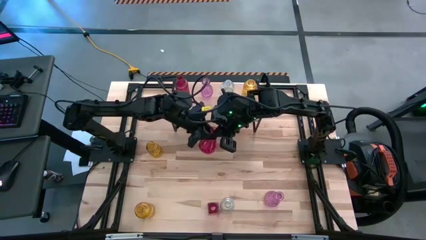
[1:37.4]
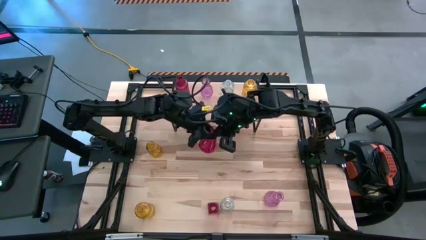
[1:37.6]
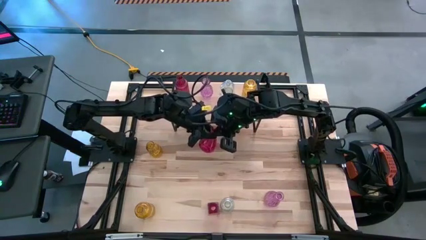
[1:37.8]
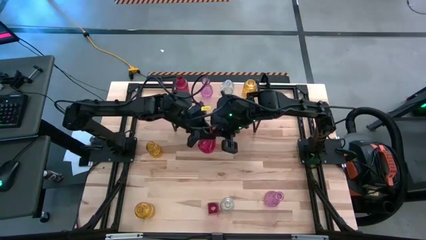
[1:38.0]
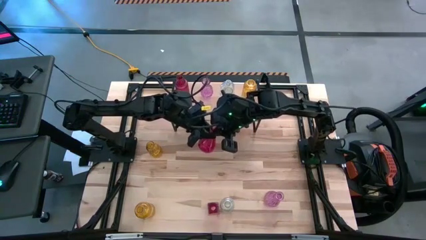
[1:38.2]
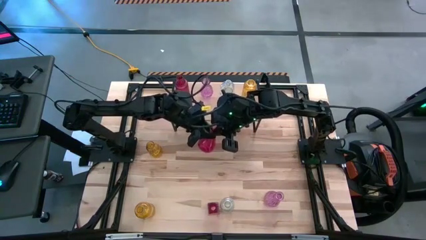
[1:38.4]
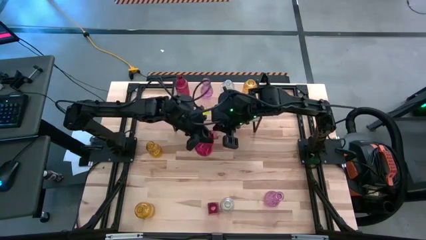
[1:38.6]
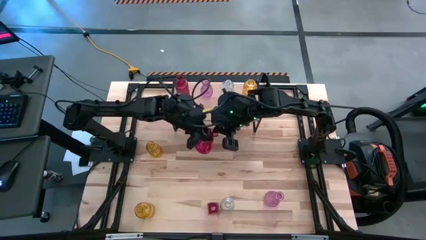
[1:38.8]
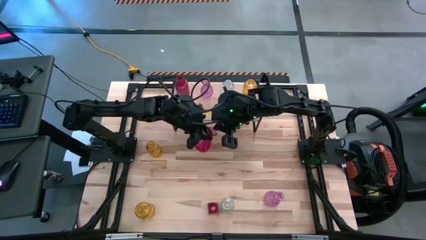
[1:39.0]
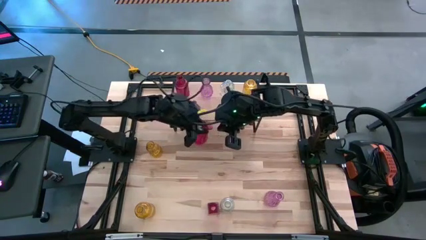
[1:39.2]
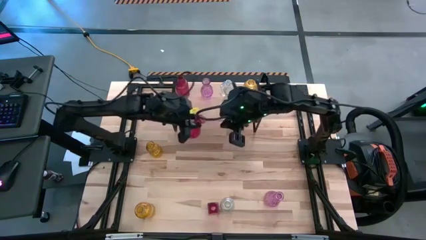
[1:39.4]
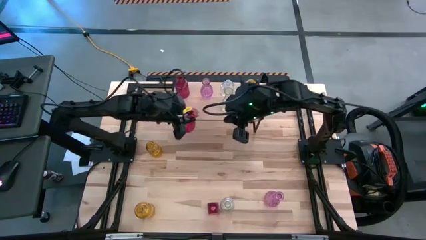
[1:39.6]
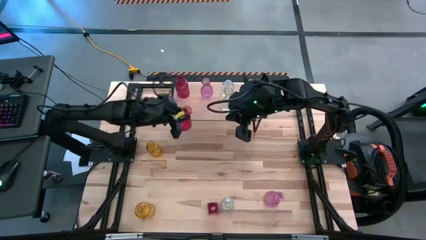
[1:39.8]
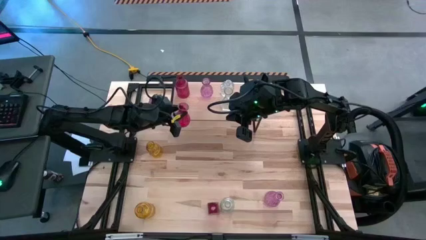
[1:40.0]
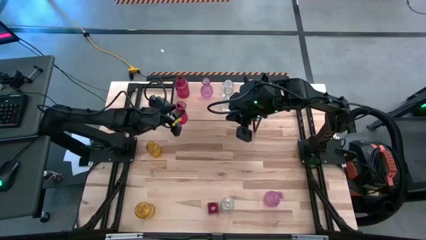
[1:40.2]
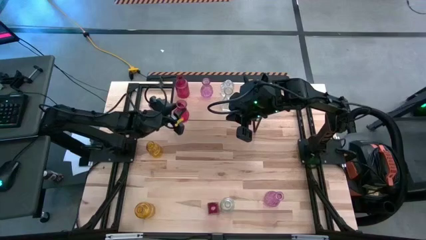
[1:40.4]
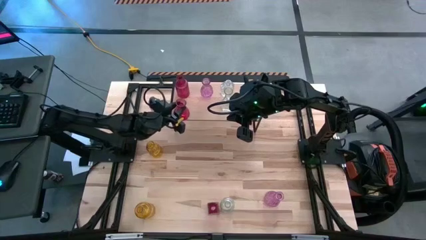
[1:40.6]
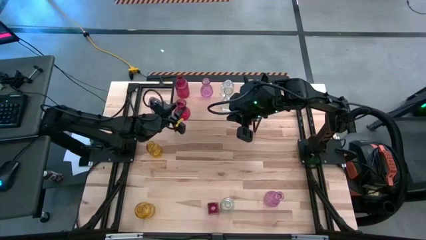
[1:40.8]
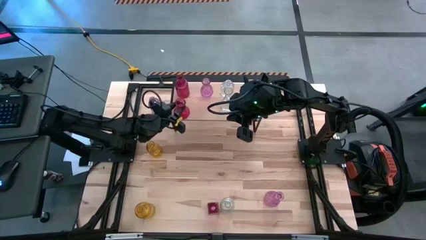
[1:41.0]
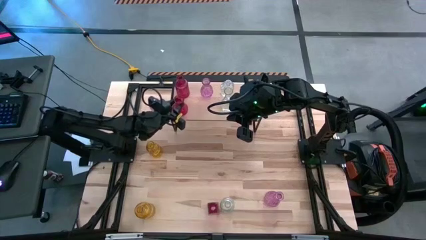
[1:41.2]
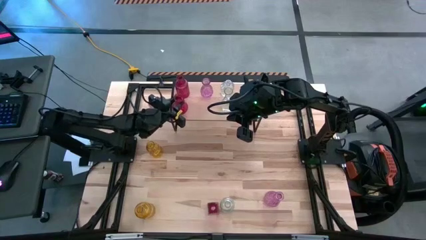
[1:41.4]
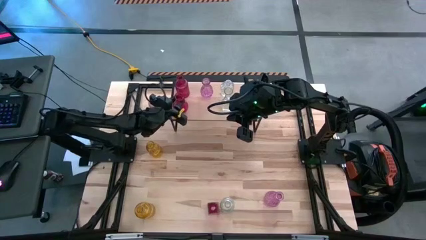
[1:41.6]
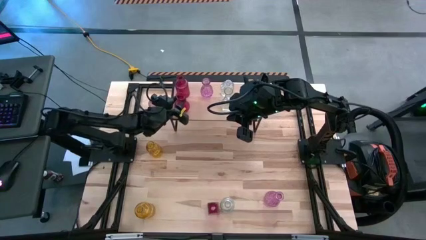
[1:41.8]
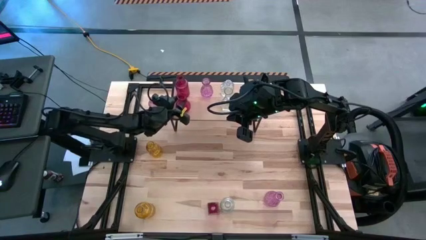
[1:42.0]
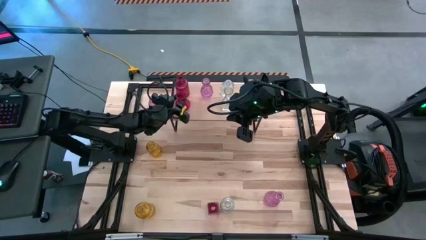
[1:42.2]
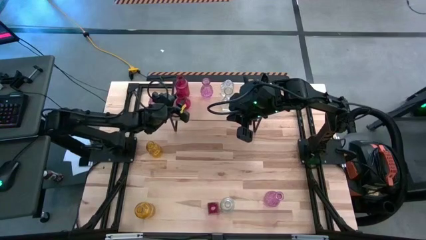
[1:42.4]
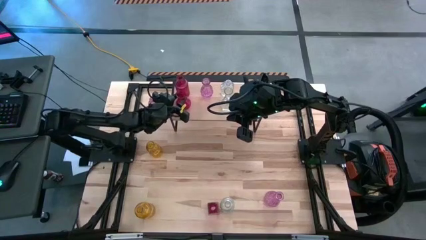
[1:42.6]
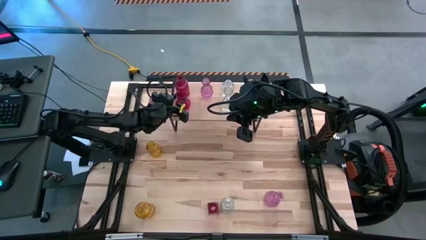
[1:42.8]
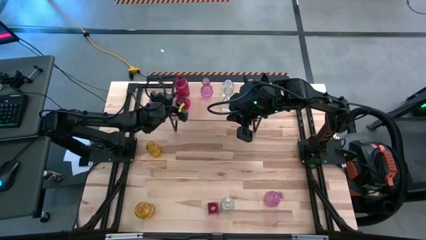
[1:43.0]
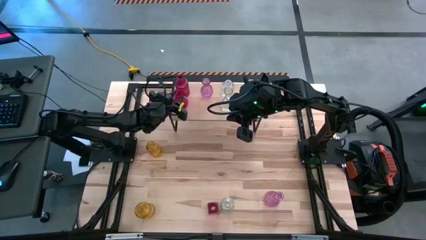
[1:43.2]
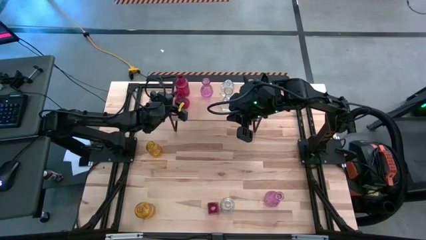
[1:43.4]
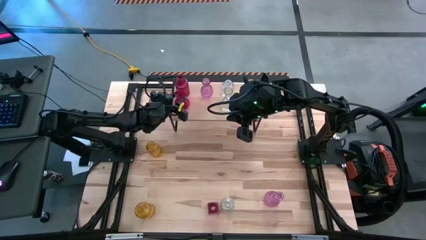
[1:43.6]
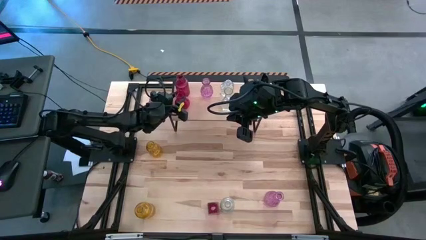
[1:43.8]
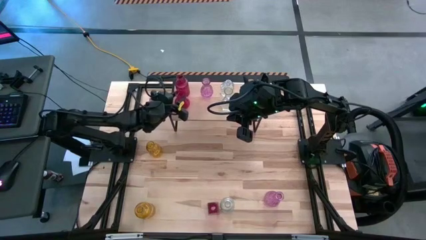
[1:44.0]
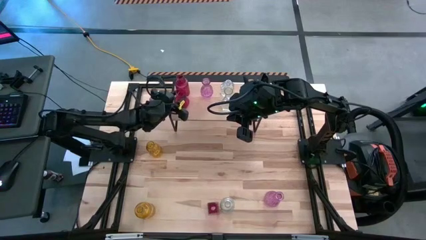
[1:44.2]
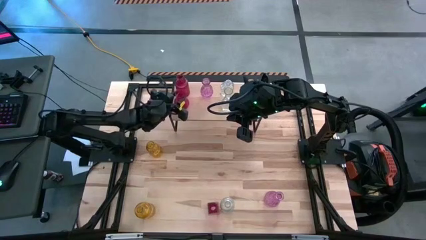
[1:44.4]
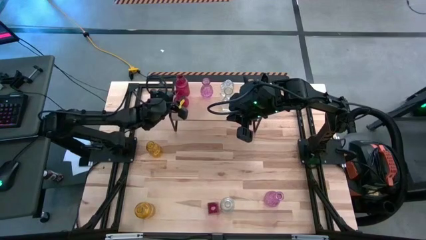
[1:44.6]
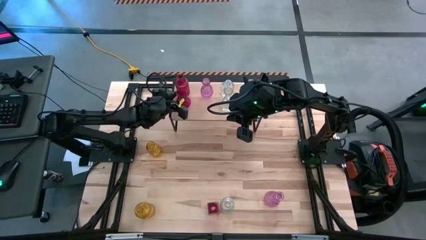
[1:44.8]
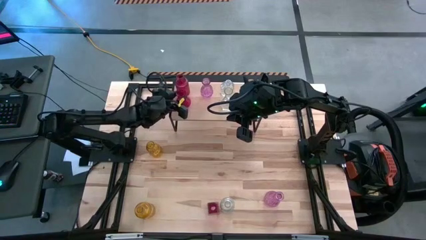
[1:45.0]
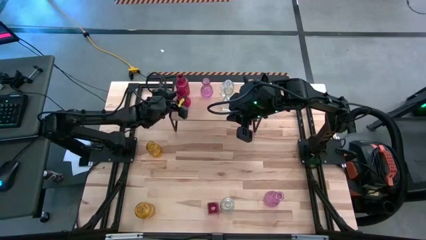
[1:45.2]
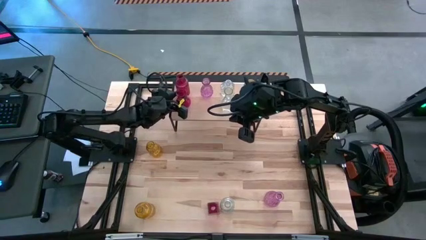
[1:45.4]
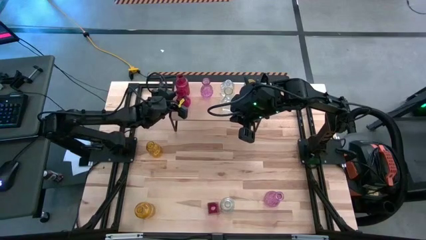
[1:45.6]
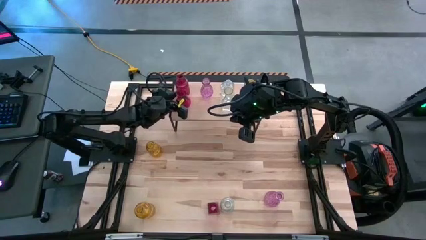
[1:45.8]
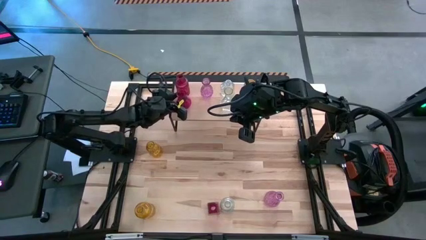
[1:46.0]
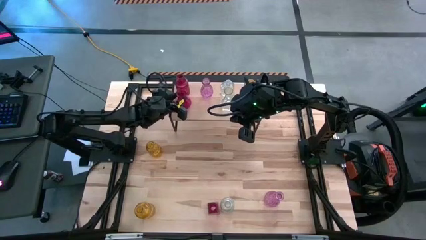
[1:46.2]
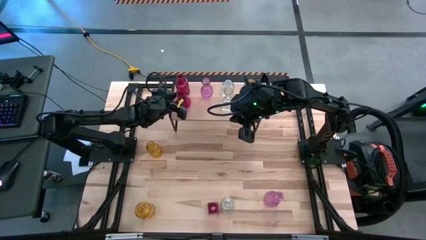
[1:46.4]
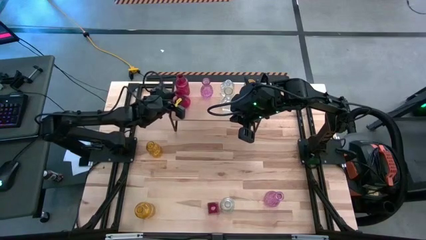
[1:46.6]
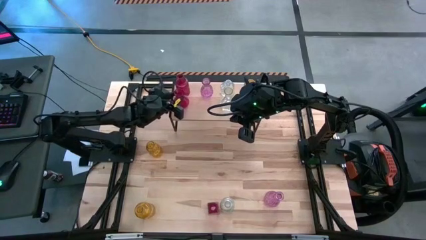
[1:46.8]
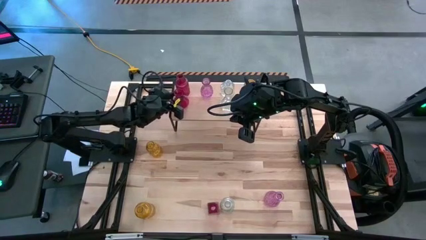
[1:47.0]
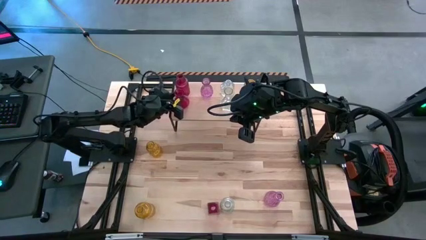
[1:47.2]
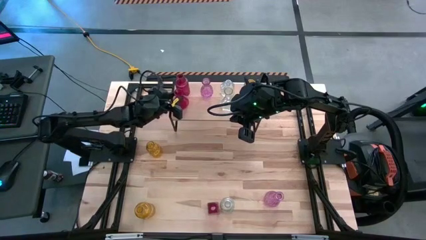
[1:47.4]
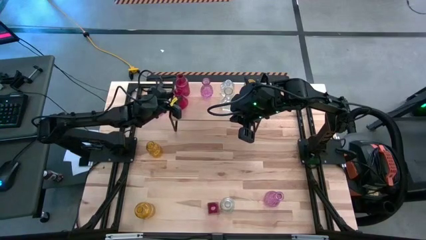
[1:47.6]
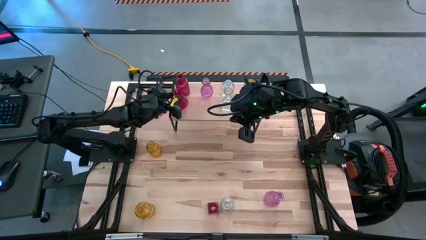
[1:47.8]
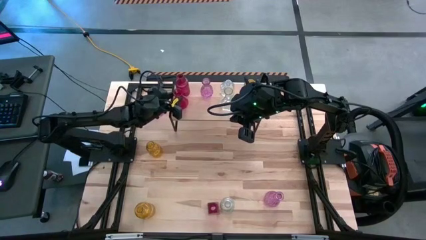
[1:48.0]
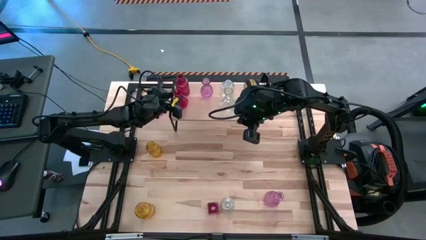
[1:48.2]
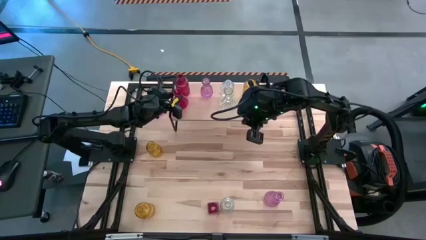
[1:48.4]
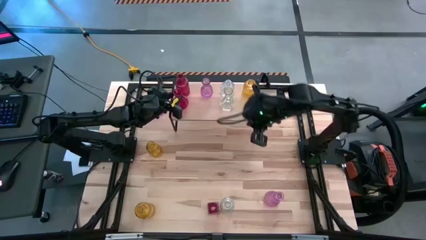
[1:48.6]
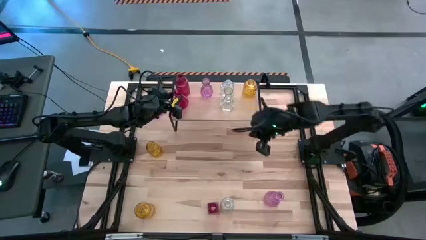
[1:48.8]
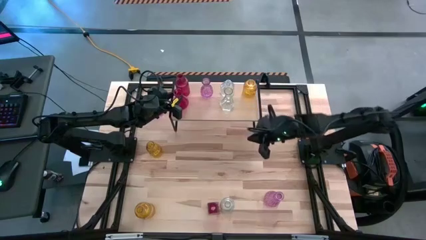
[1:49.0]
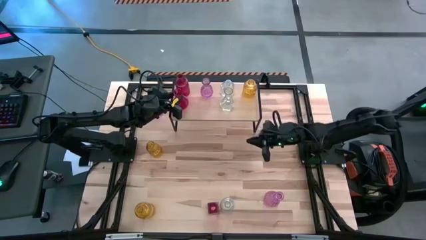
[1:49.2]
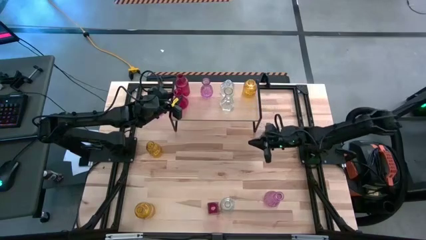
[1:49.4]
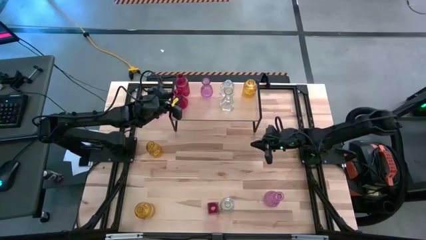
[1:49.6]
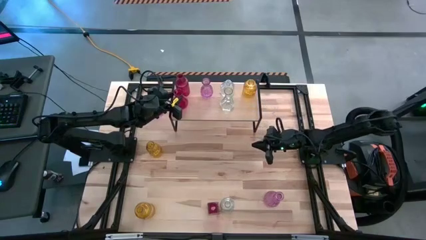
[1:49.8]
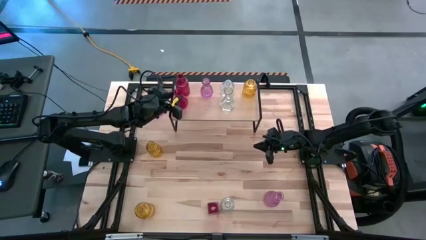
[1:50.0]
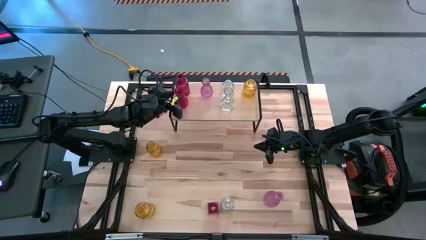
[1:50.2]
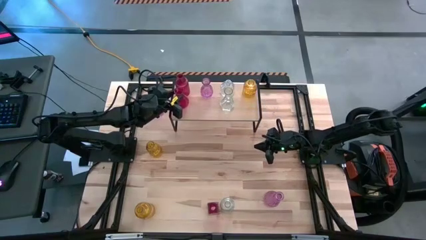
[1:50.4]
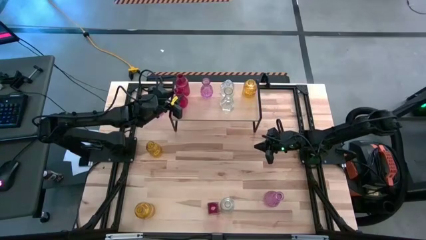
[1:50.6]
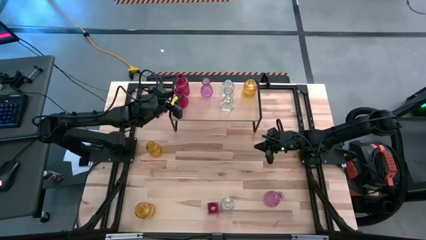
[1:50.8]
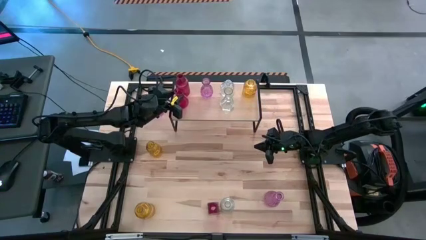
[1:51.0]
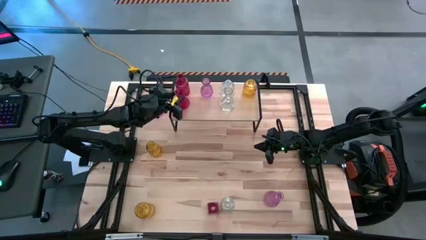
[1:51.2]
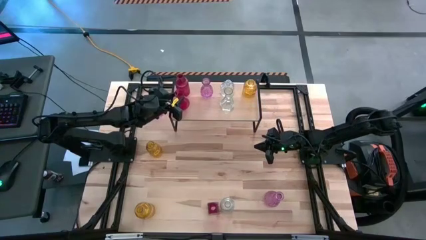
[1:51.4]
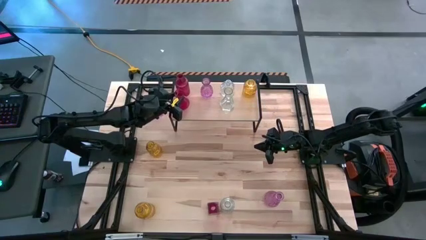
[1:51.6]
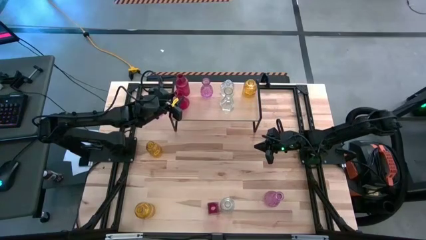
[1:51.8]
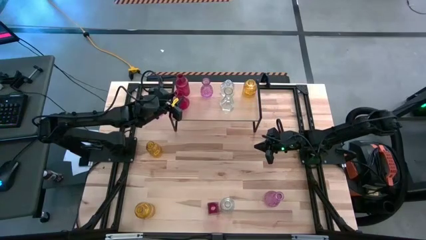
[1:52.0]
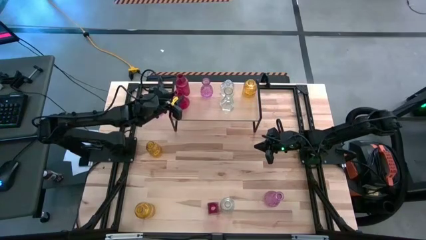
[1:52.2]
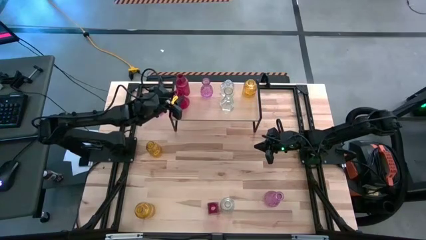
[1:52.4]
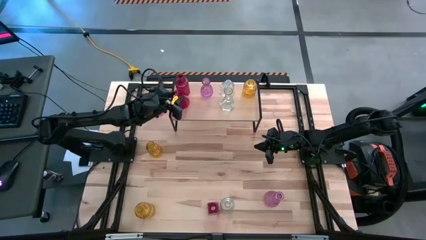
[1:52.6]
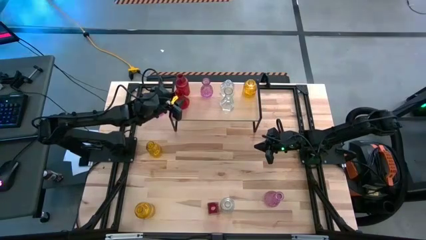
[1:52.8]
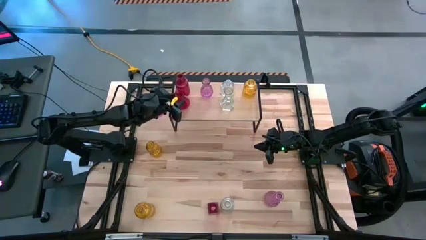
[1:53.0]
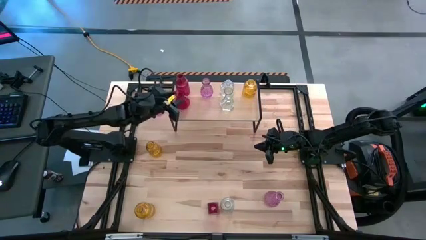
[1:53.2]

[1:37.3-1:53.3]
Task: sort vases onto shelf
Put the right red vase on the shelf aligned with the other red vase
